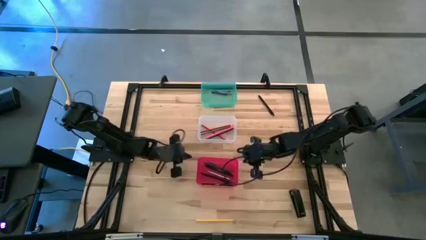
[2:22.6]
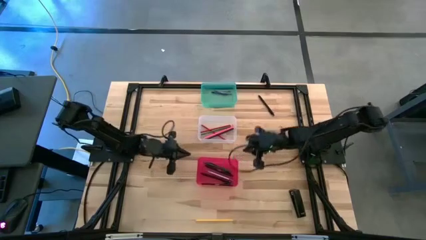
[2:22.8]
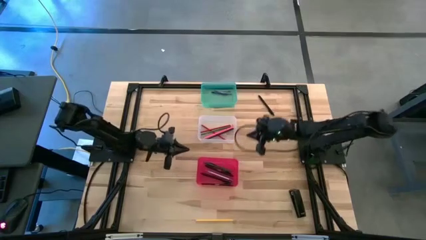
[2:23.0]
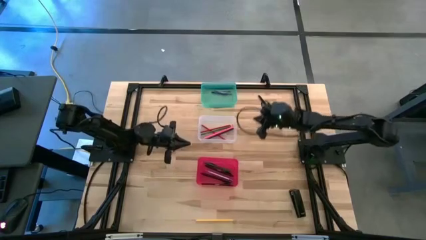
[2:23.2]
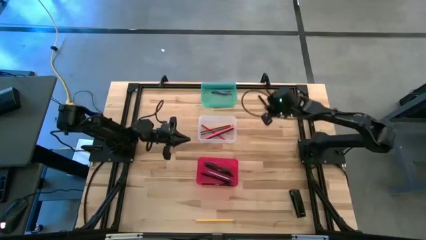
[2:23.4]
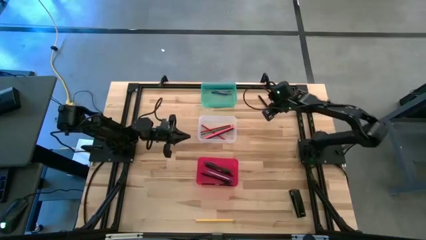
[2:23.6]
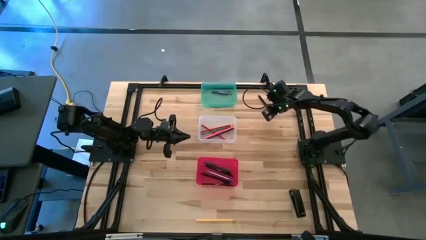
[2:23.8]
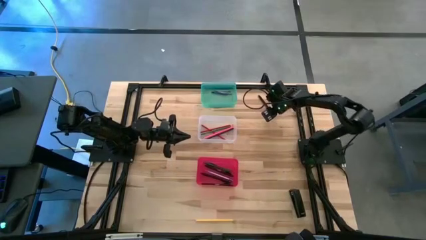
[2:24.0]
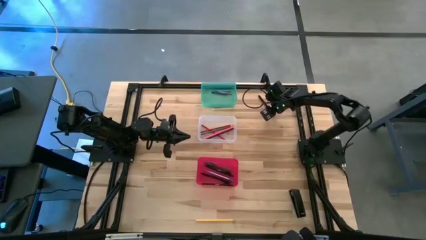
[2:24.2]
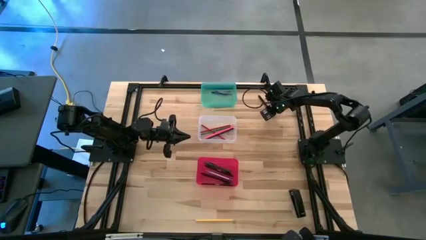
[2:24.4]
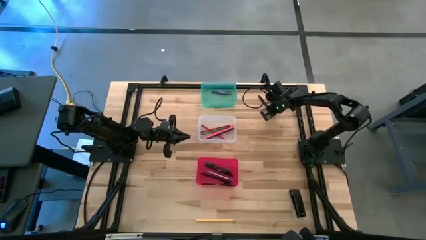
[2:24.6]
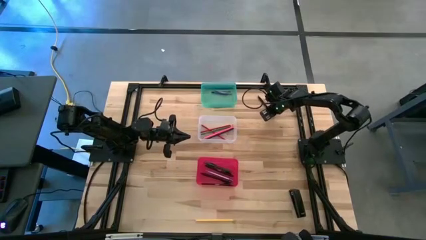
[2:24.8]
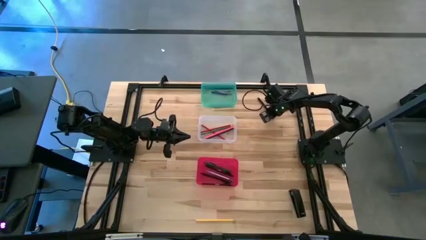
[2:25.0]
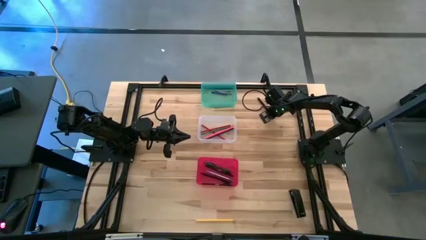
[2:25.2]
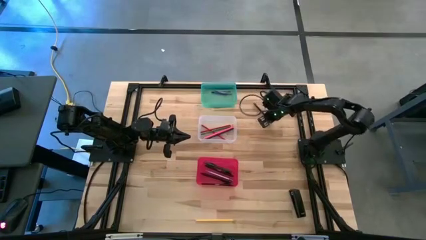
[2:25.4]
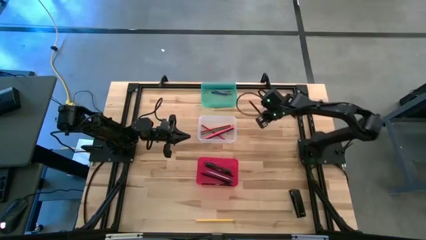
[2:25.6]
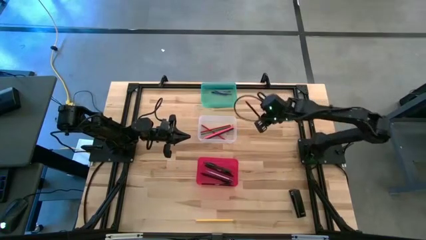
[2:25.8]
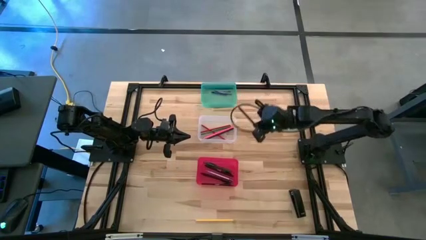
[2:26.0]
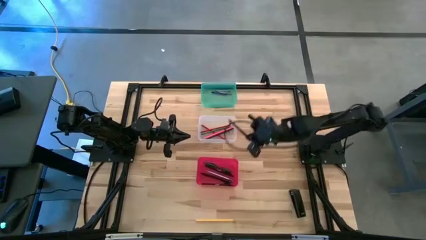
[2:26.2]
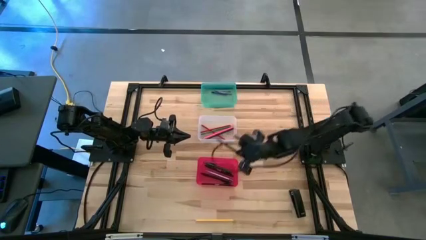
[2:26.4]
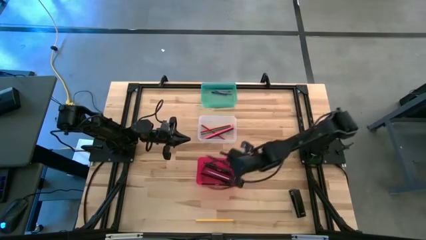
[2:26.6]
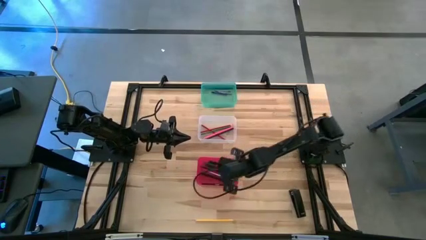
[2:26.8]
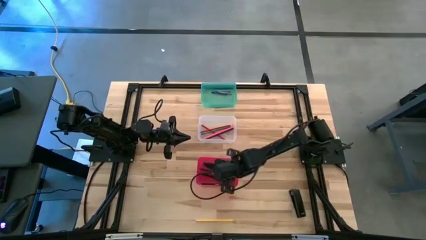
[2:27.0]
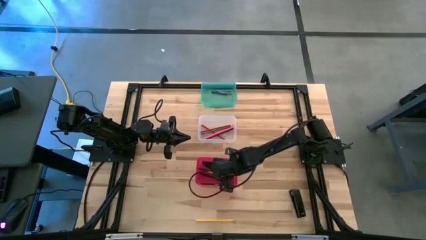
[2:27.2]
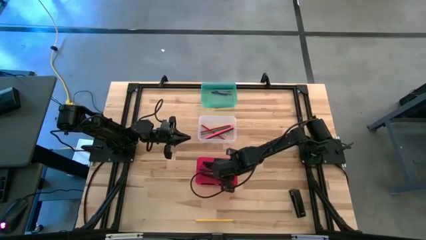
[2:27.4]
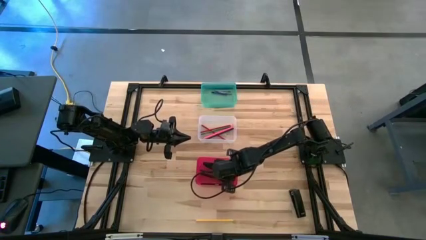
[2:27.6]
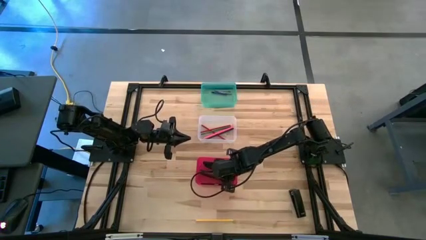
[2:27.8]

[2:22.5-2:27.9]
Task: Sort crayons/erasers/pens/pencils in bins
Put the black pen into the red bin

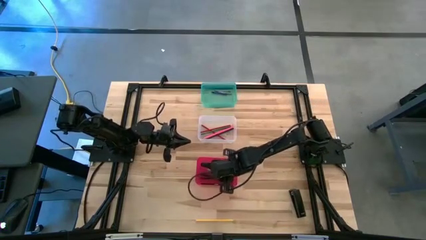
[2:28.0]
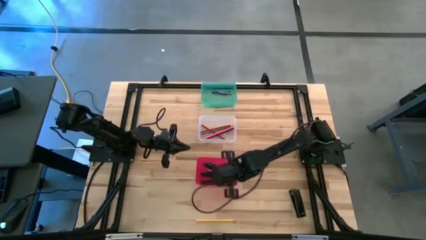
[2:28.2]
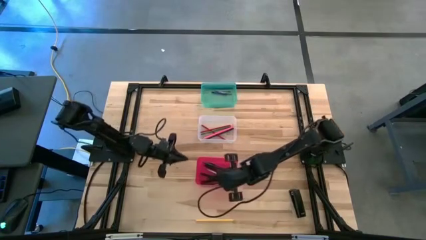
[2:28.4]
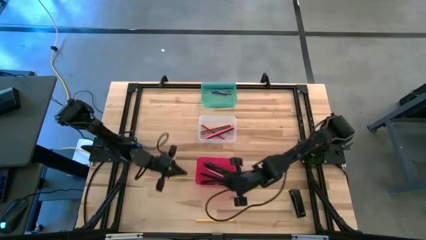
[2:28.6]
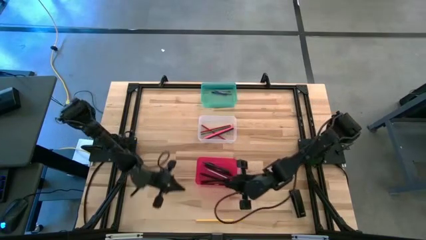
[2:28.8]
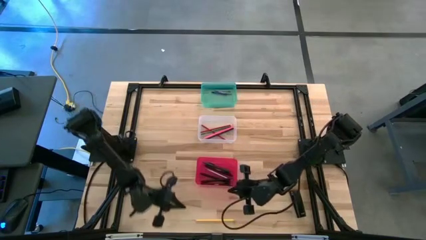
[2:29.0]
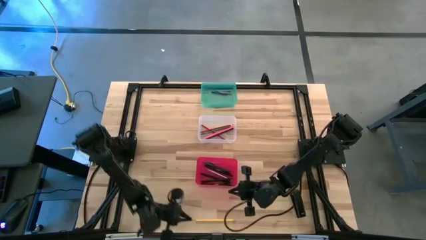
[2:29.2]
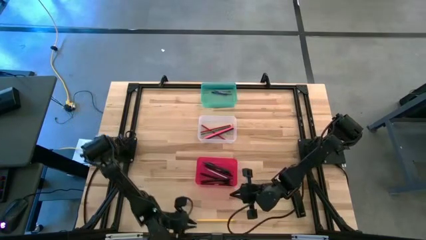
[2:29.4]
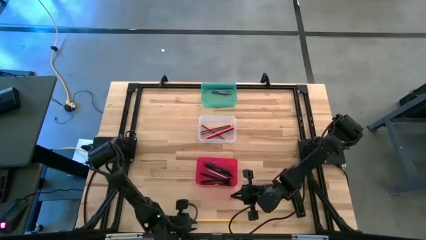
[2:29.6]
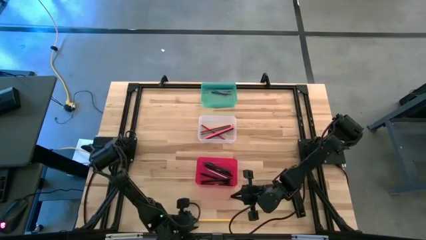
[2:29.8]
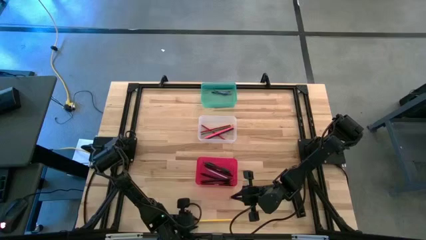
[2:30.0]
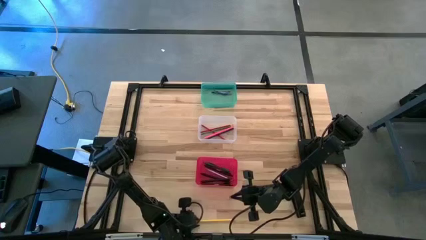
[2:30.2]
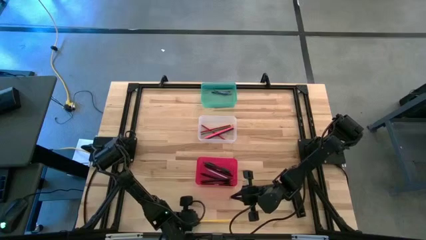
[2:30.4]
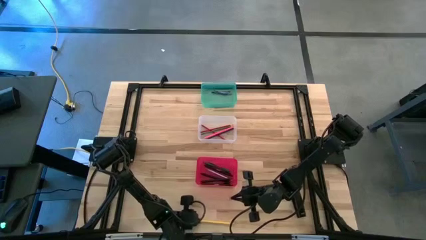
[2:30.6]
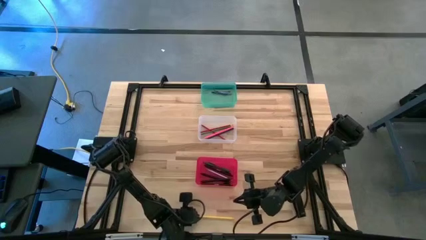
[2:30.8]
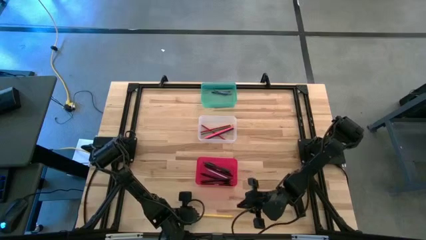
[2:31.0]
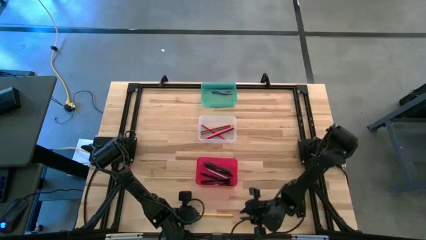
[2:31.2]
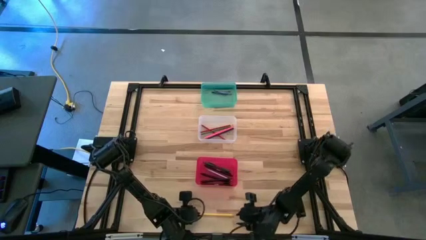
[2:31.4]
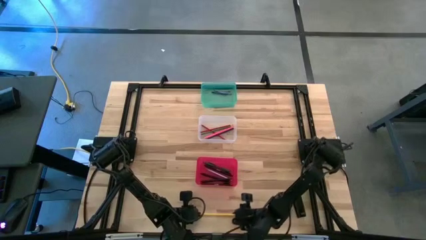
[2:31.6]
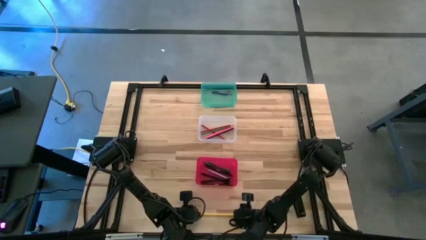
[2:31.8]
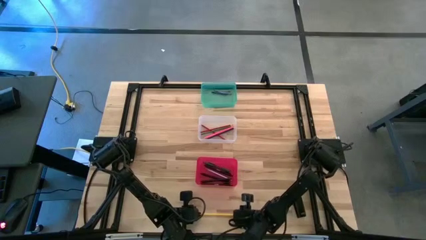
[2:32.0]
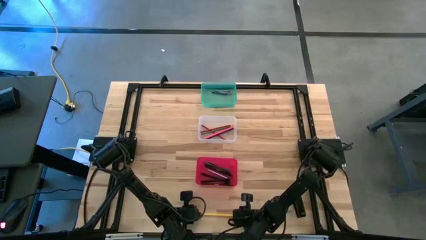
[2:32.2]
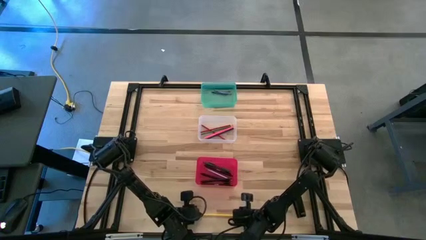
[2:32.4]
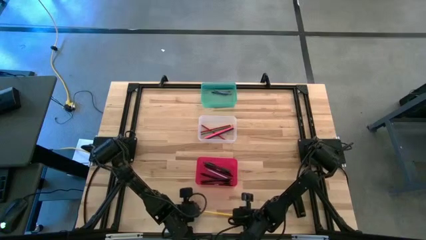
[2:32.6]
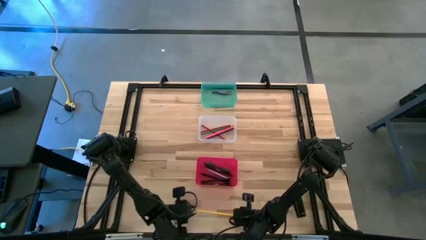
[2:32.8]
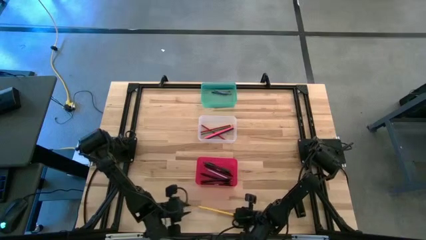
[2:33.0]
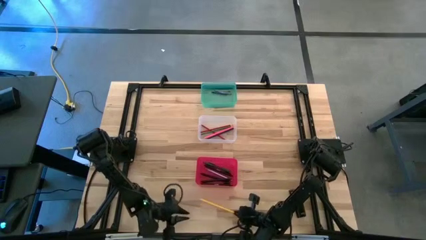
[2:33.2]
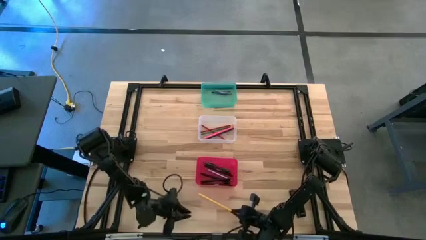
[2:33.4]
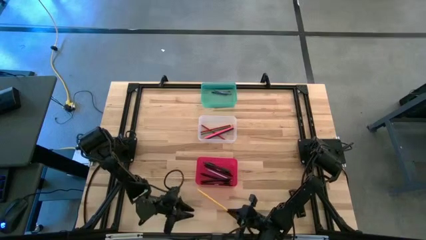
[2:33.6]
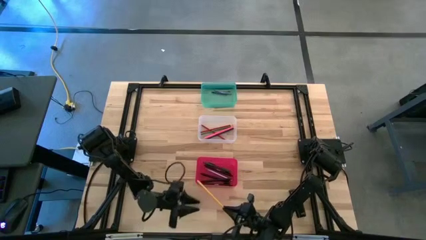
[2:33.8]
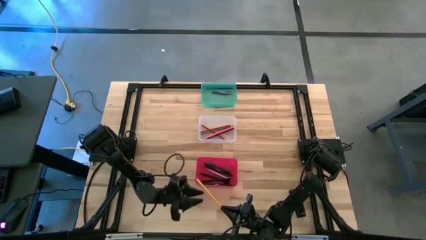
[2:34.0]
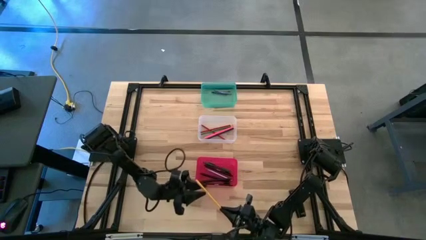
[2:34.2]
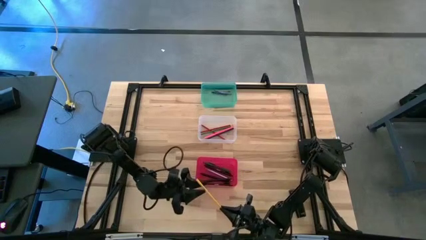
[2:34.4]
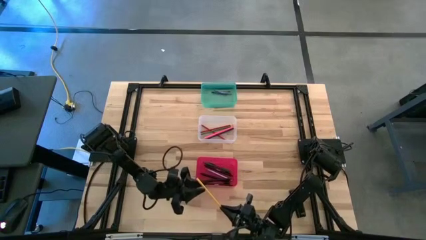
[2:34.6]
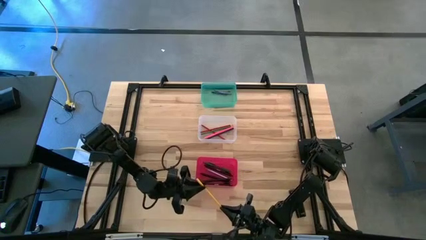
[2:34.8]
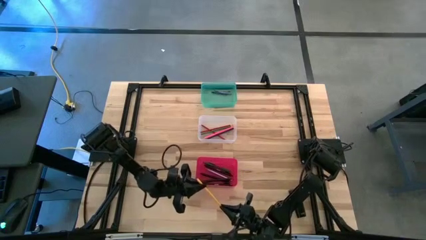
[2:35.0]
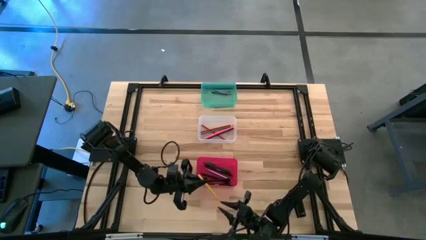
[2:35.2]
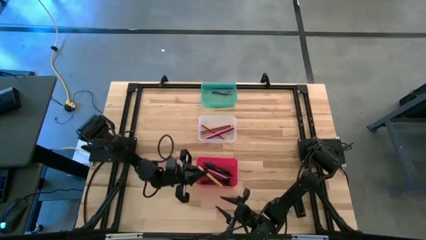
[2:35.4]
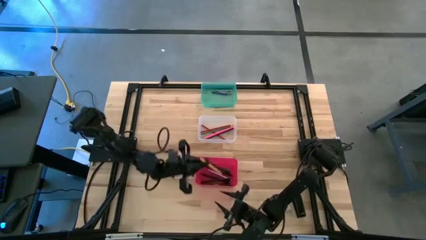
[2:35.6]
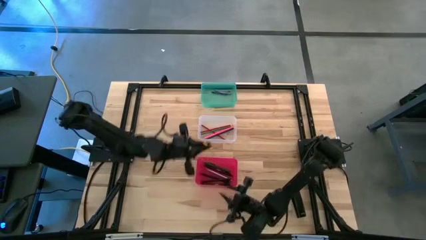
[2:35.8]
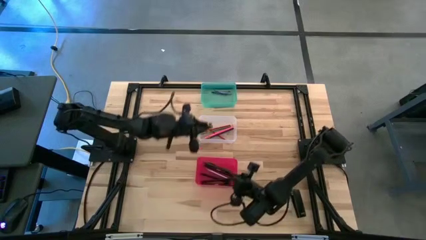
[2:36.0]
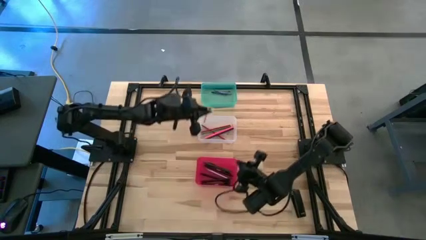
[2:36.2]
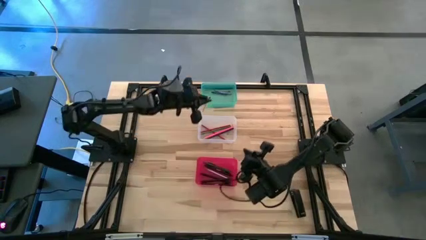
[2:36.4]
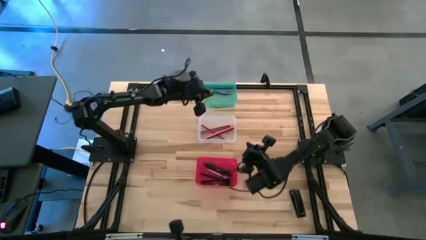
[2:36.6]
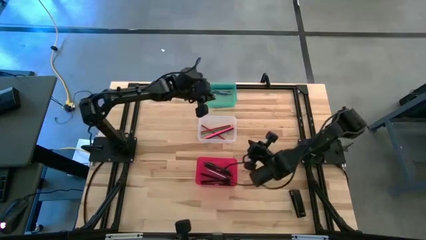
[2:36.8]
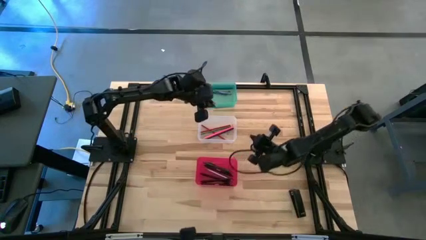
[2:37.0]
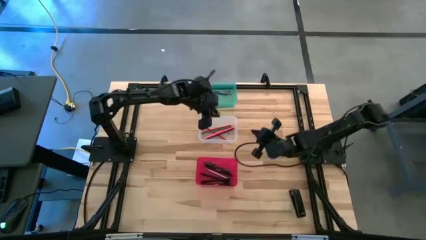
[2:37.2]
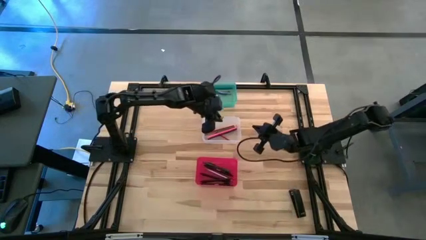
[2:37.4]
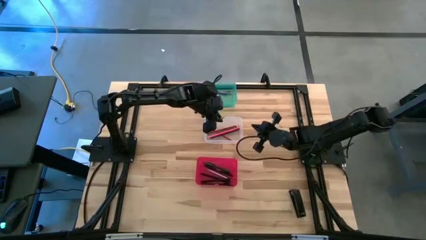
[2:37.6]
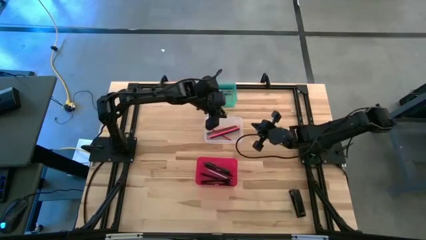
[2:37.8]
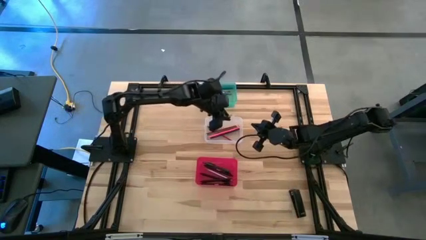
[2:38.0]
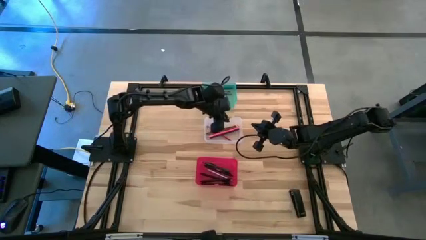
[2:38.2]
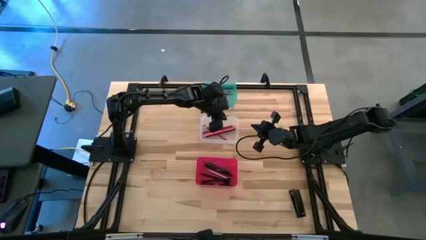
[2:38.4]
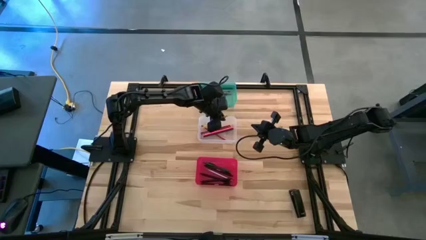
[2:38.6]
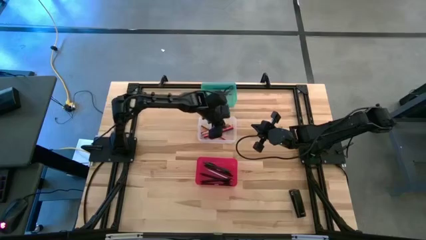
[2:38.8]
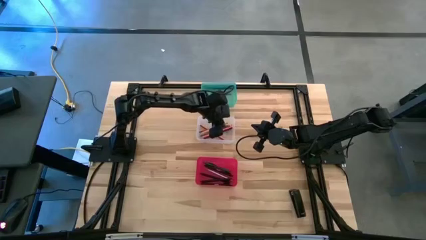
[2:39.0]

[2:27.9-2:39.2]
Put the yellow pencil into the transparent bin
